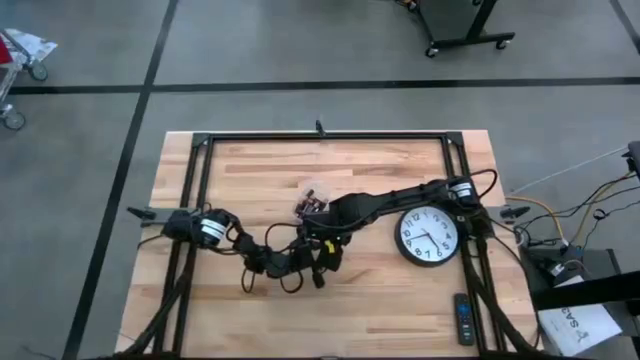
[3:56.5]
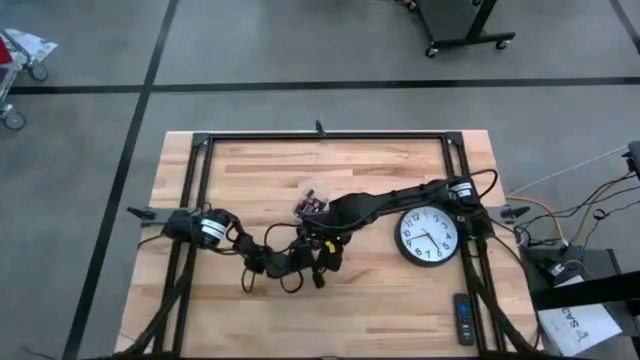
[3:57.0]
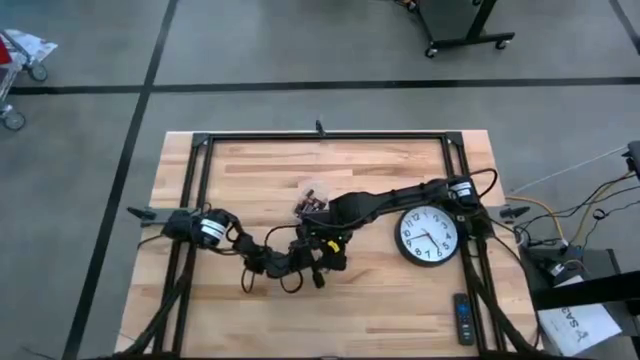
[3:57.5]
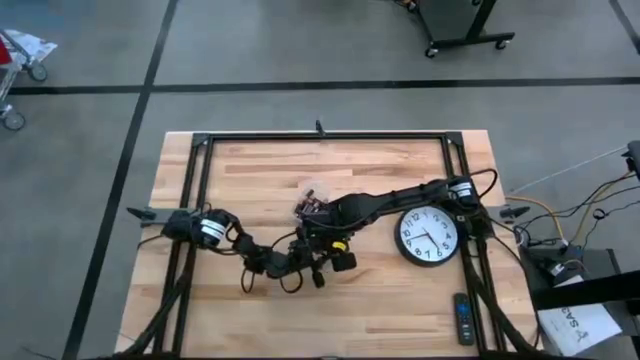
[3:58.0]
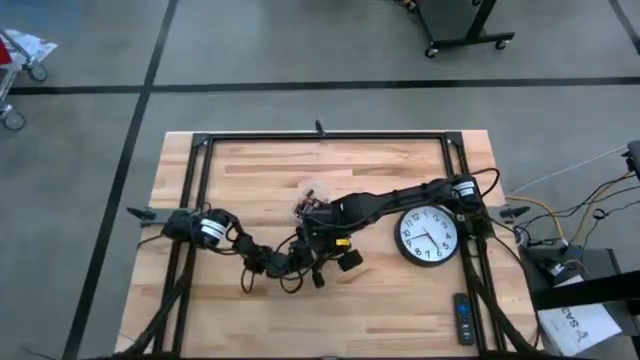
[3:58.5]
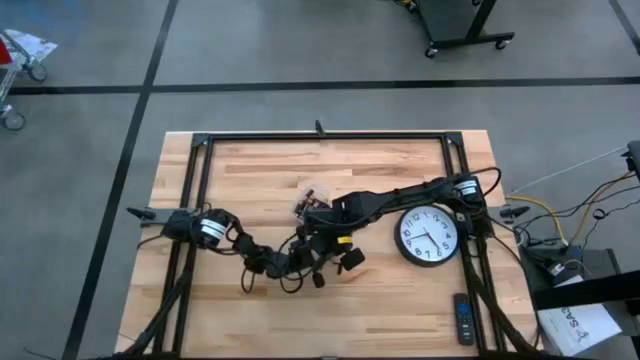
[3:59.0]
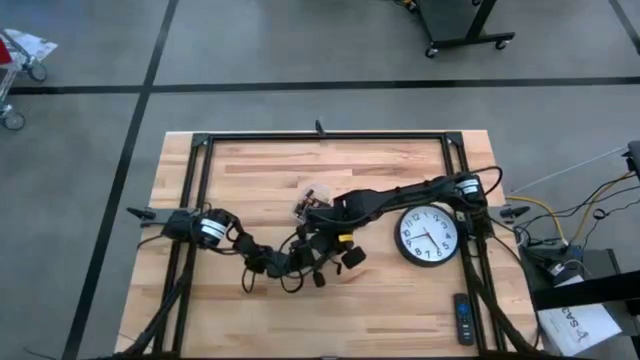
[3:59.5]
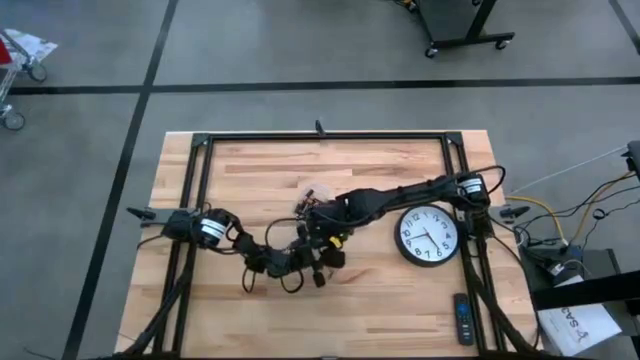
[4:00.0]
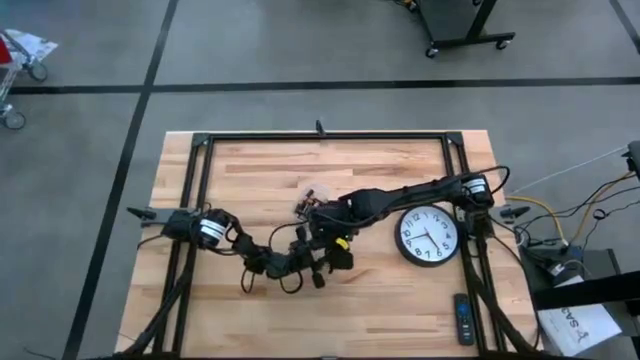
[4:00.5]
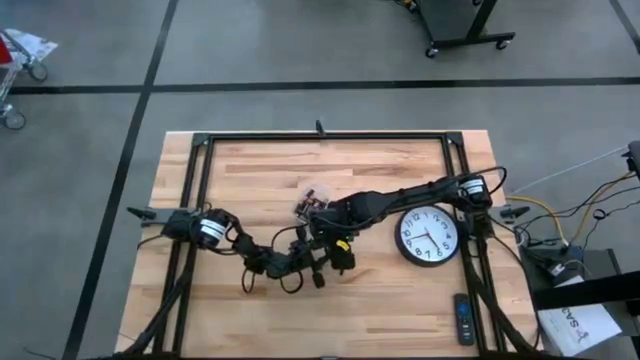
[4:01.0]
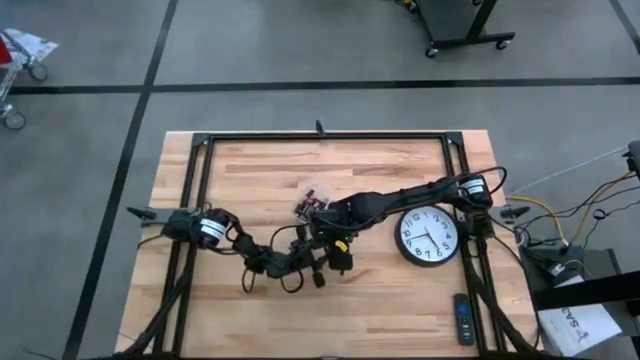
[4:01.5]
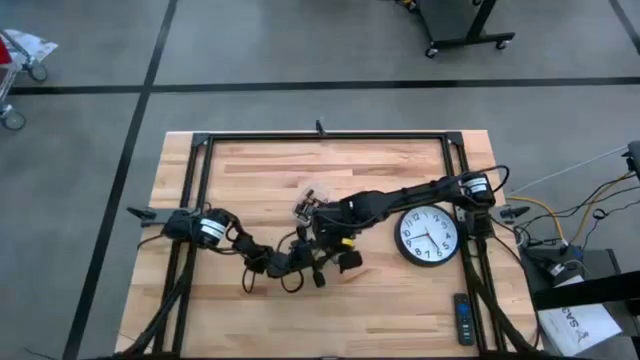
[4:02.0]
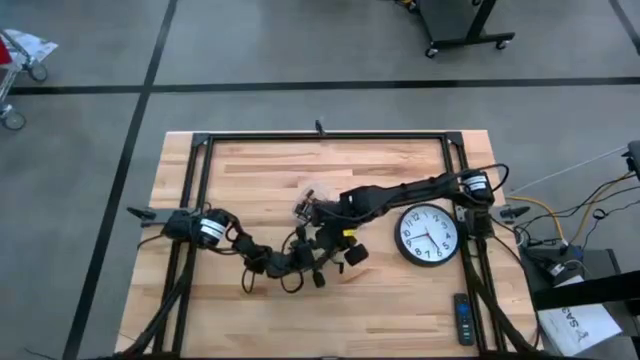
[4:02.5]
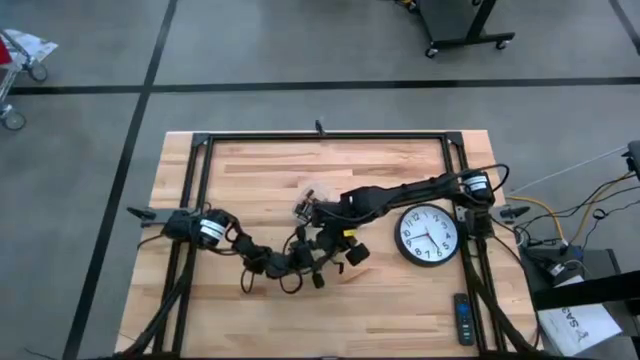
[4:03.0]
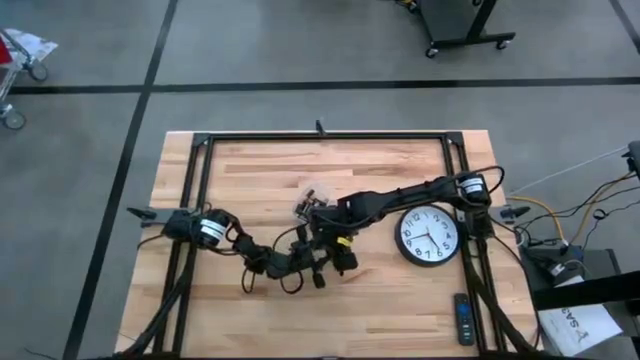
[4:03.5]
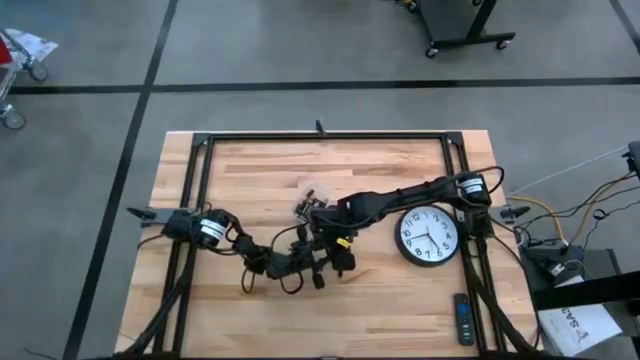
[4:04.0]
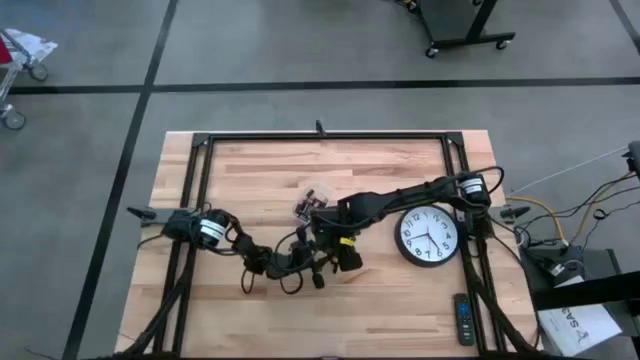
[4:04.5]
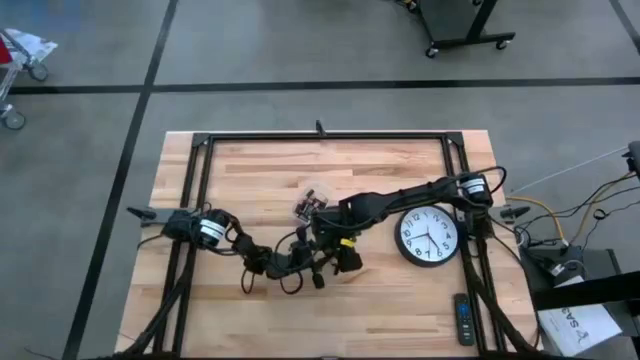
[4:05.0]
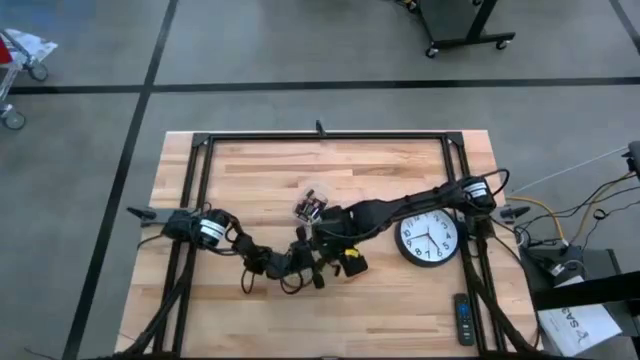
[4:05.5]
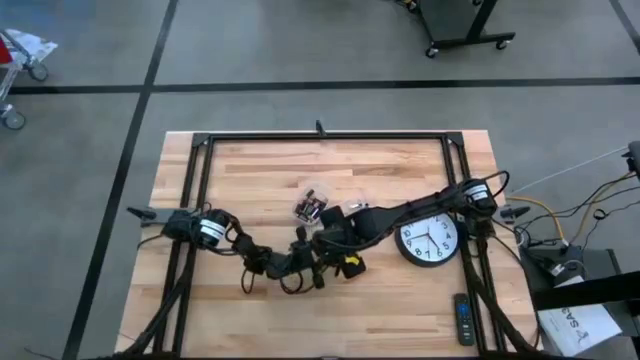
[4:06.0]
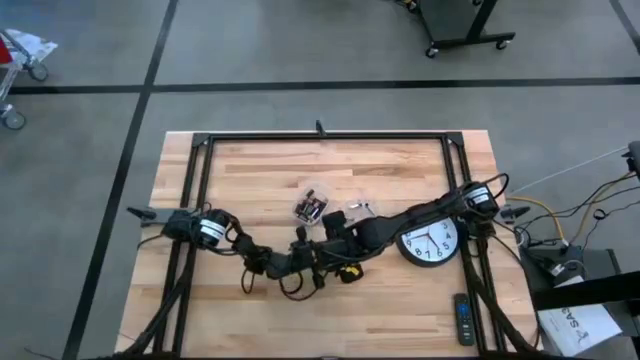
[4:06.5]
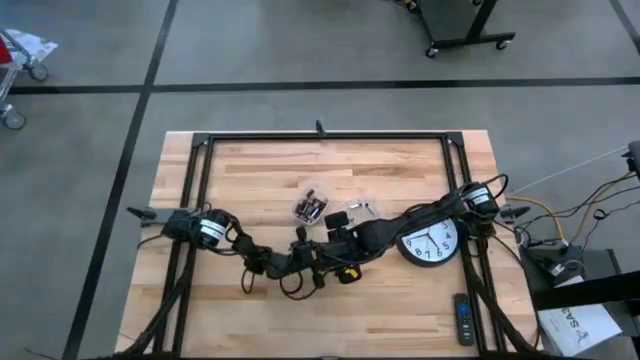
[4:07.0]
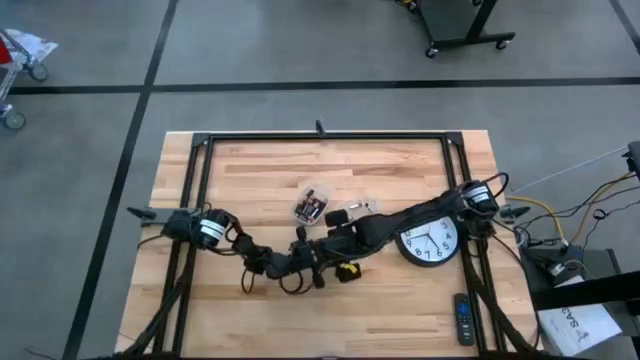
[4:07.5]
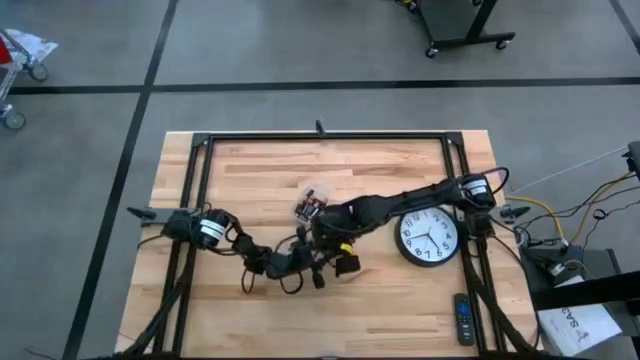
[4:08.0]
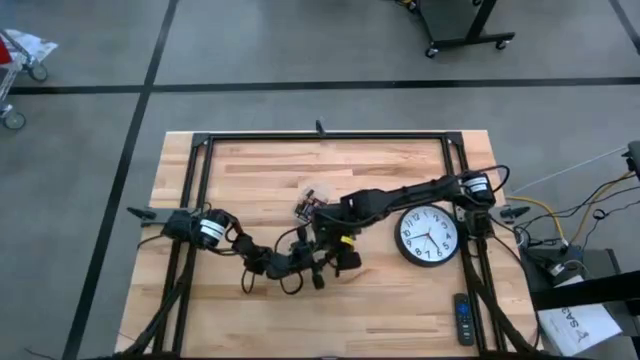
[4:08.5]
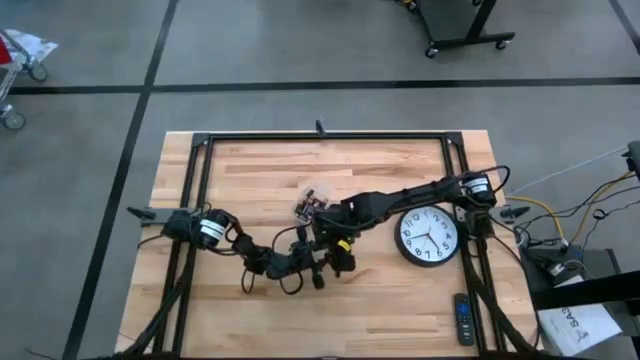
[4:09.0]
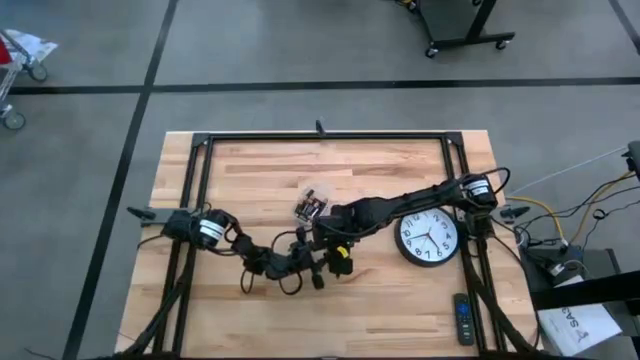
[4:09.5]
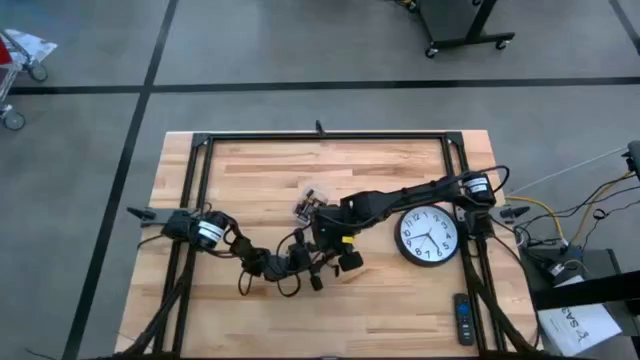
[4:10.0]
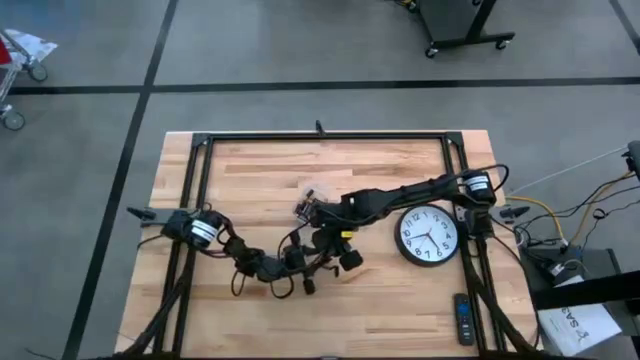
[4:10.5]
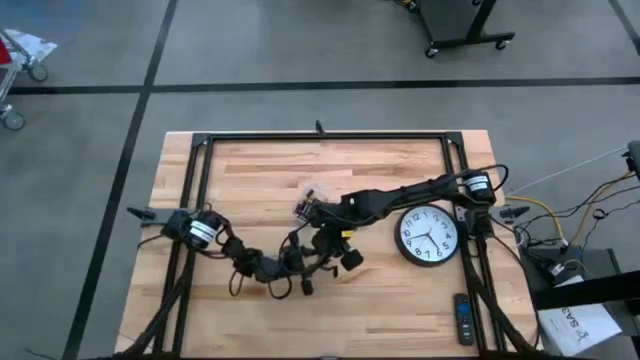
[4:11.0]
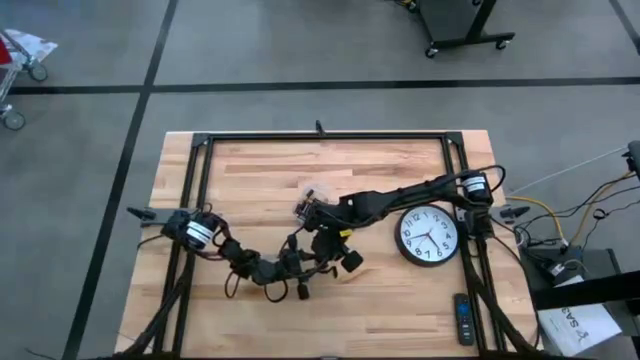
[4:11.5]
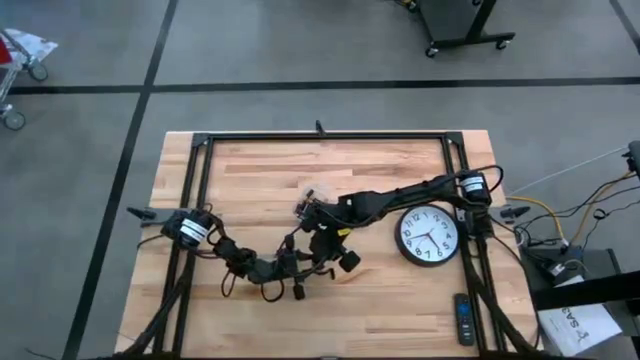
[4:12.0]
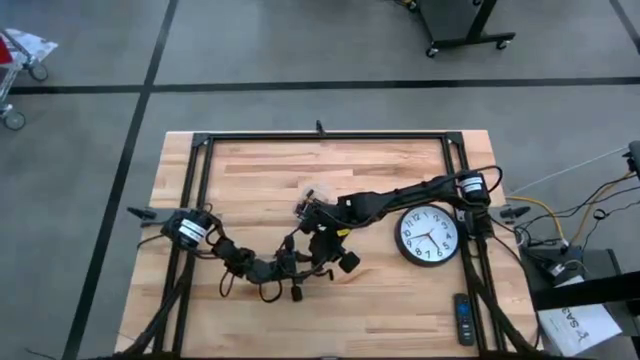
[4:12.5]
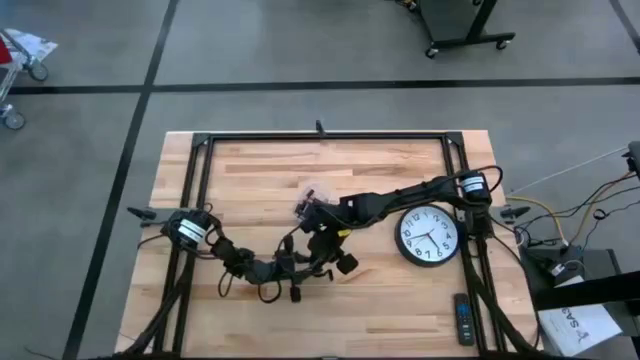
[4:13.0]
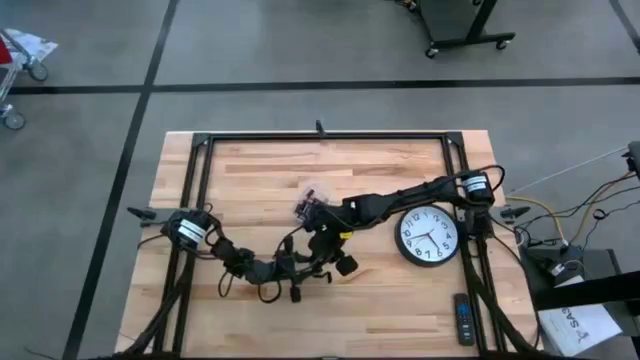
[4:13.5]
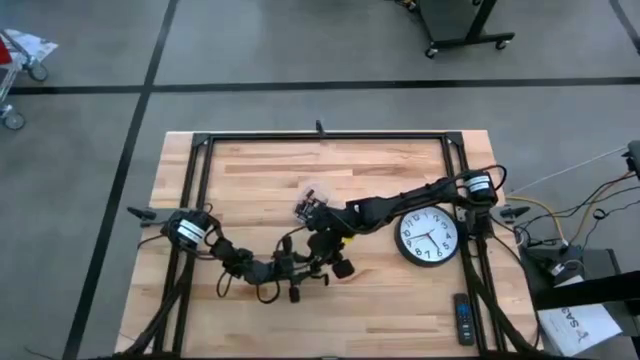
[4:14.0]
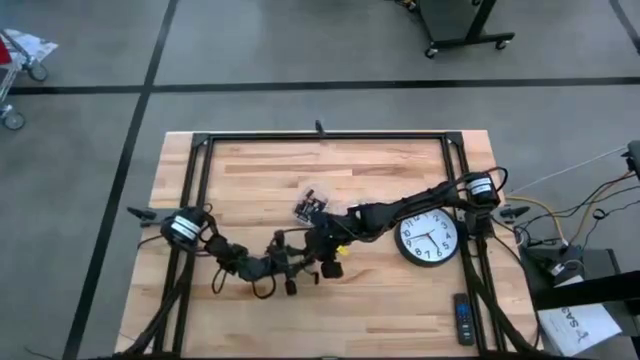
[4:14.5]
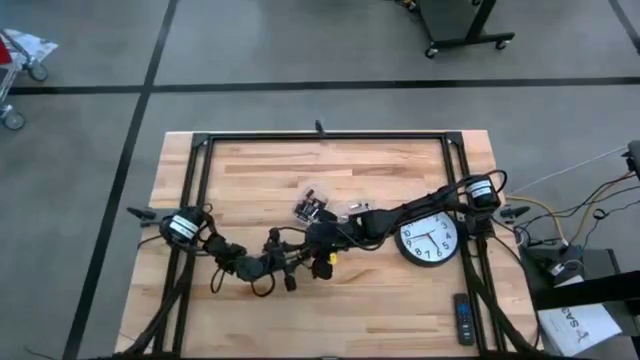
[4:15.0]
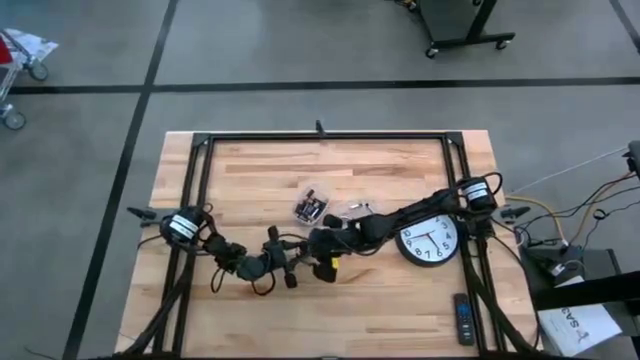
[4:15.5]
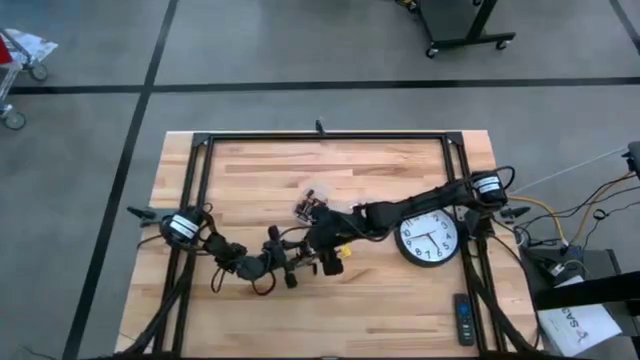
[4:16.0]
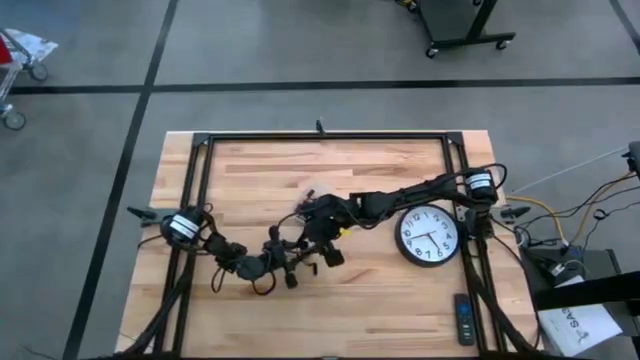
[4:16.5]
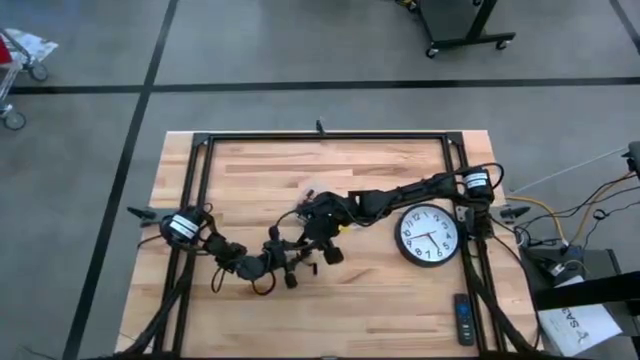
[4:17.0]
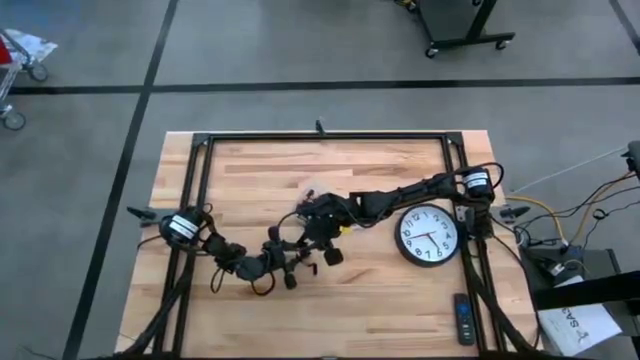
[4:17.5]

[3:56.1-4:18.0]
Task: Insert battery
Close the black flashlight cover
